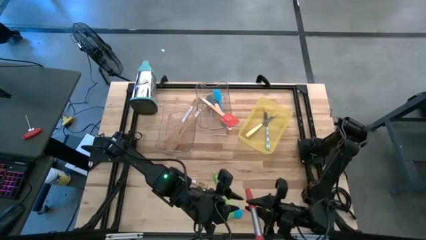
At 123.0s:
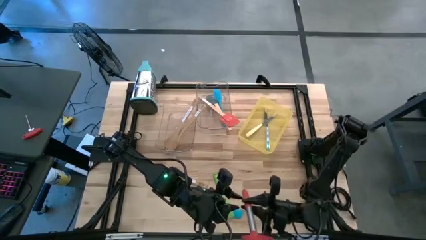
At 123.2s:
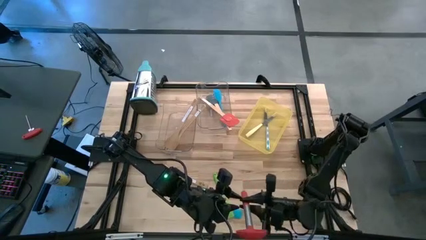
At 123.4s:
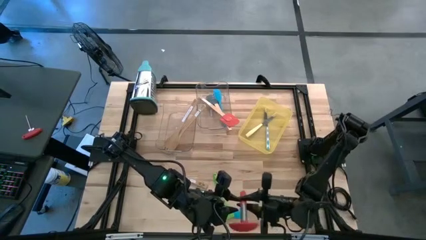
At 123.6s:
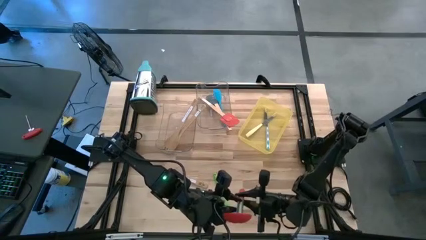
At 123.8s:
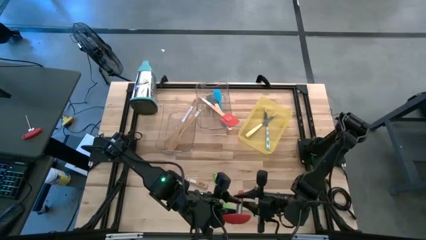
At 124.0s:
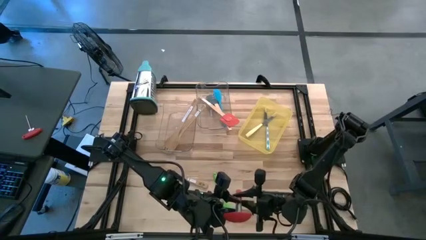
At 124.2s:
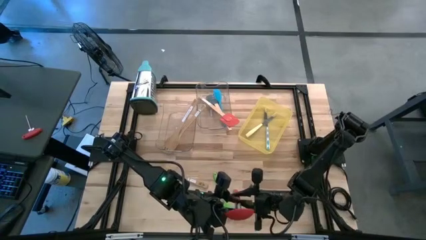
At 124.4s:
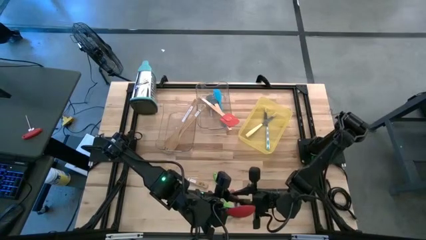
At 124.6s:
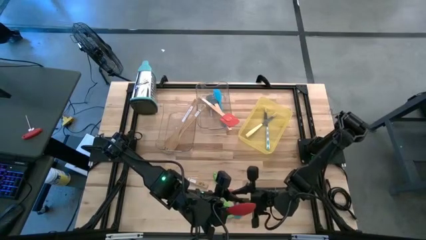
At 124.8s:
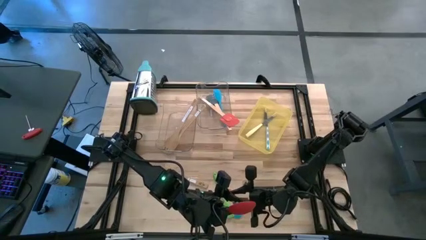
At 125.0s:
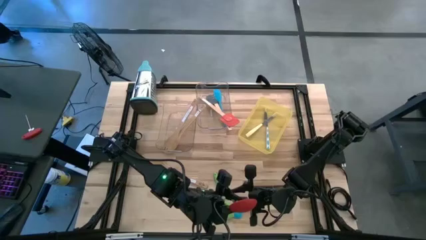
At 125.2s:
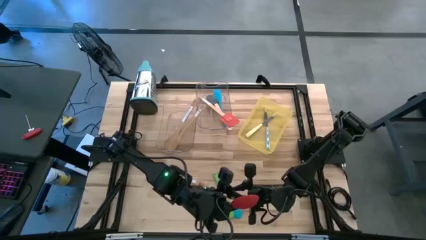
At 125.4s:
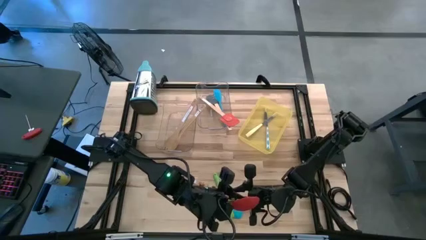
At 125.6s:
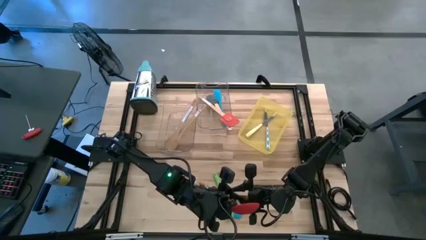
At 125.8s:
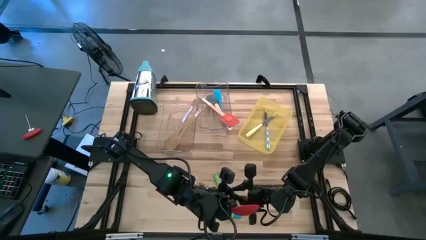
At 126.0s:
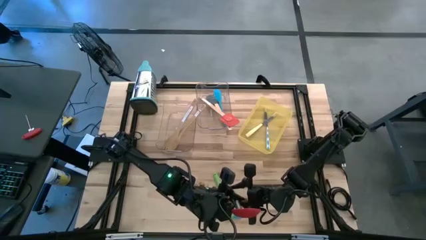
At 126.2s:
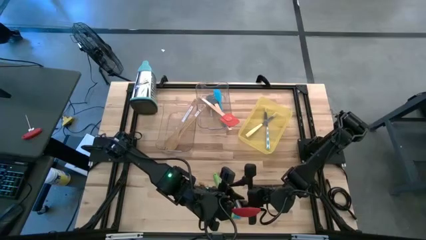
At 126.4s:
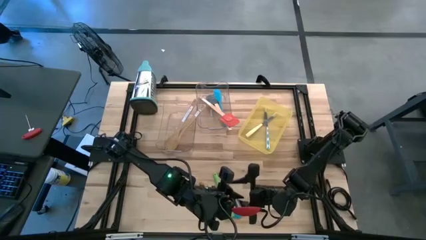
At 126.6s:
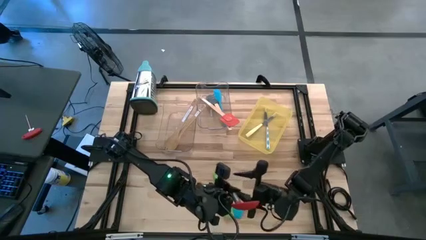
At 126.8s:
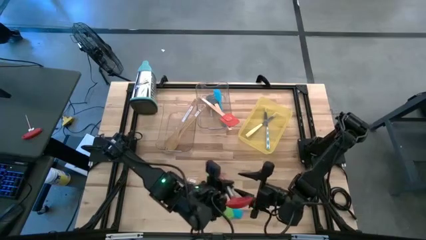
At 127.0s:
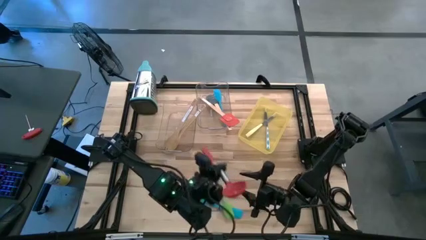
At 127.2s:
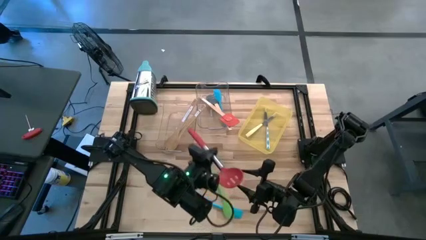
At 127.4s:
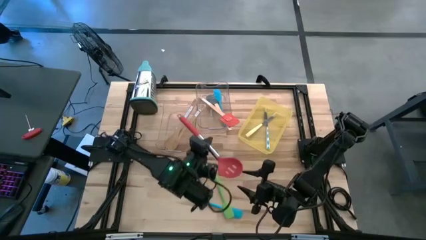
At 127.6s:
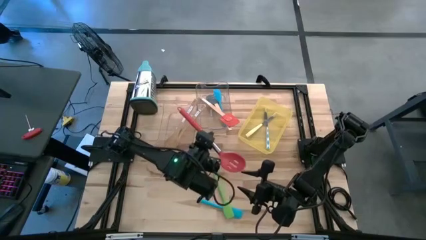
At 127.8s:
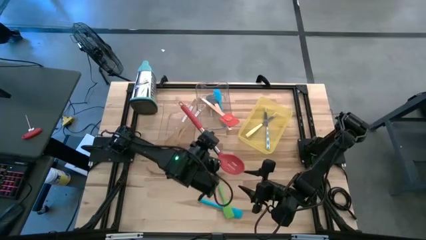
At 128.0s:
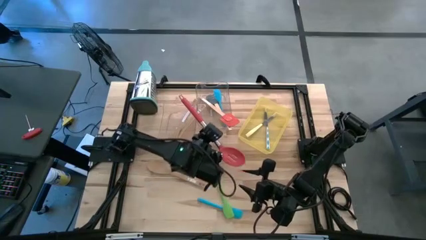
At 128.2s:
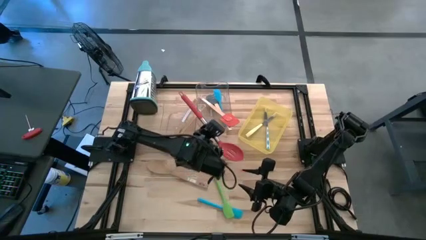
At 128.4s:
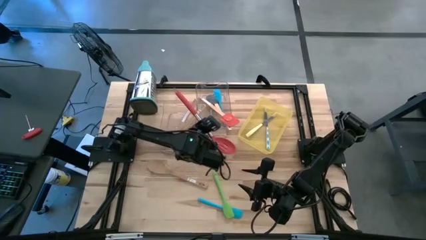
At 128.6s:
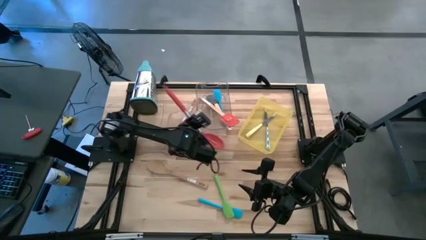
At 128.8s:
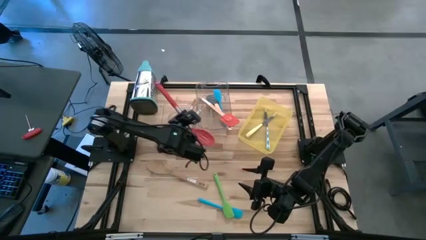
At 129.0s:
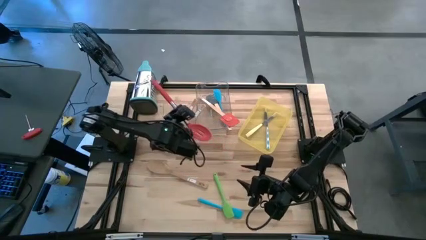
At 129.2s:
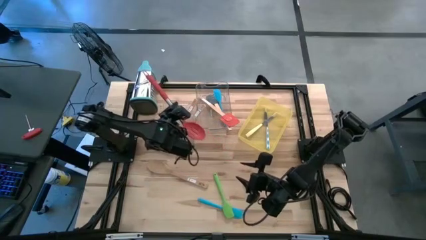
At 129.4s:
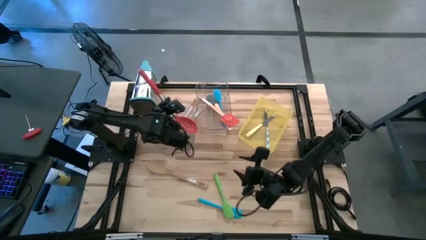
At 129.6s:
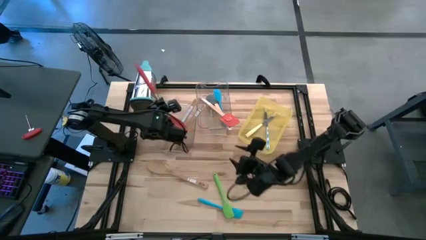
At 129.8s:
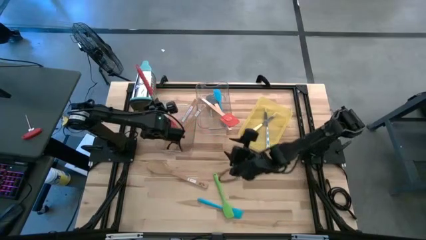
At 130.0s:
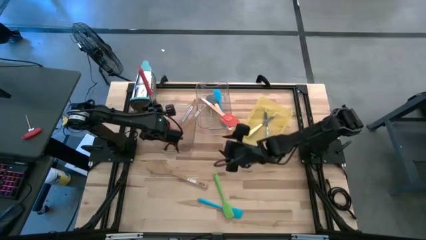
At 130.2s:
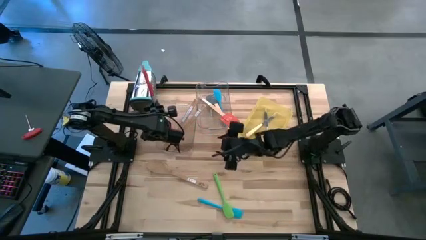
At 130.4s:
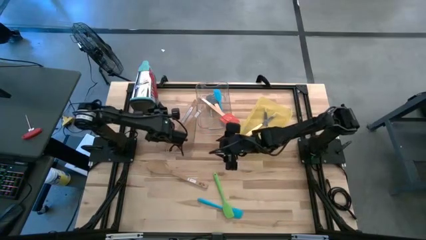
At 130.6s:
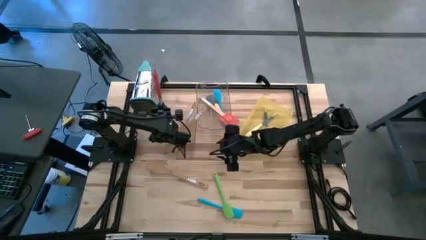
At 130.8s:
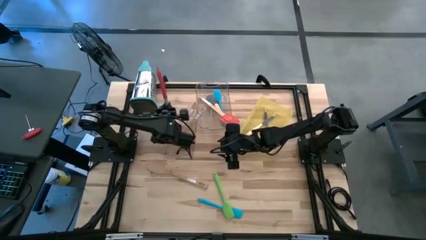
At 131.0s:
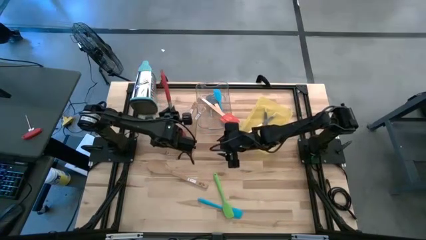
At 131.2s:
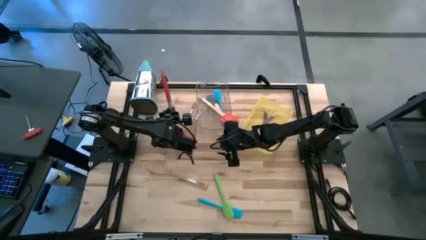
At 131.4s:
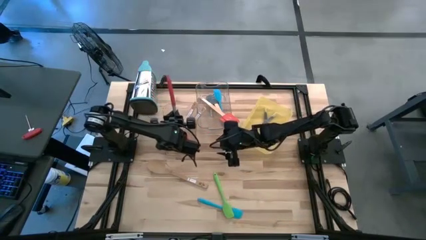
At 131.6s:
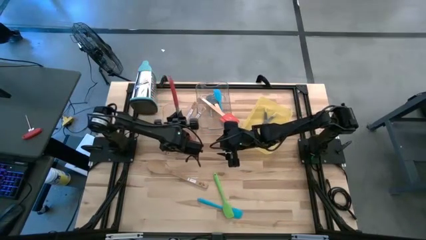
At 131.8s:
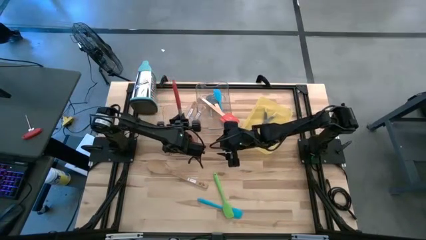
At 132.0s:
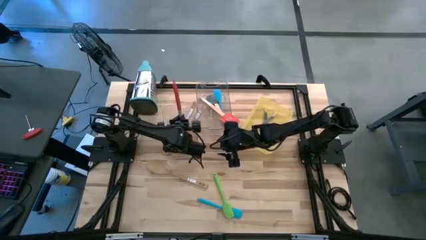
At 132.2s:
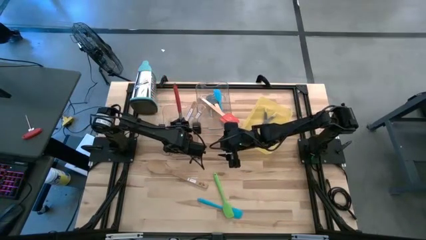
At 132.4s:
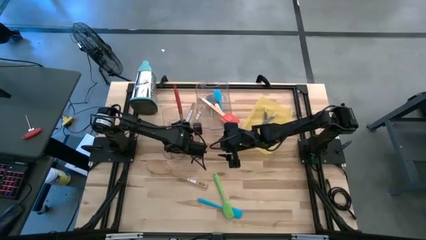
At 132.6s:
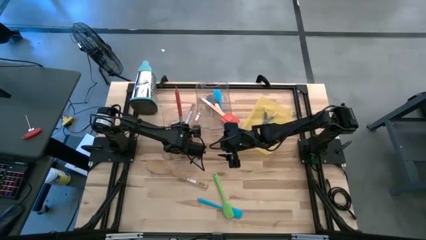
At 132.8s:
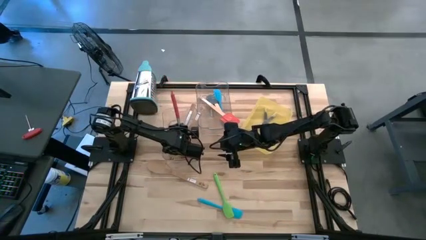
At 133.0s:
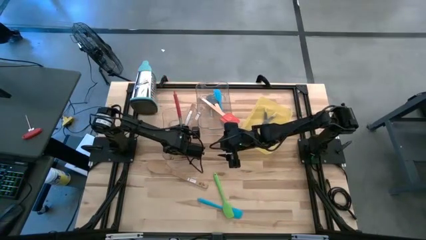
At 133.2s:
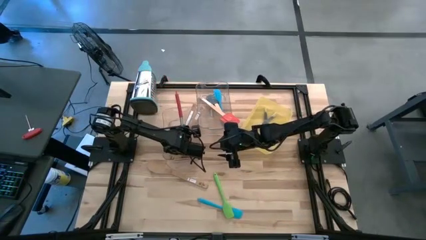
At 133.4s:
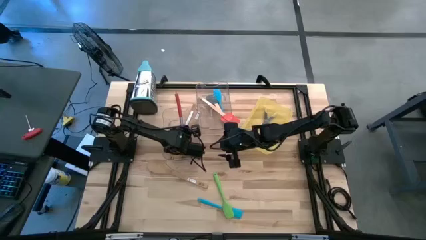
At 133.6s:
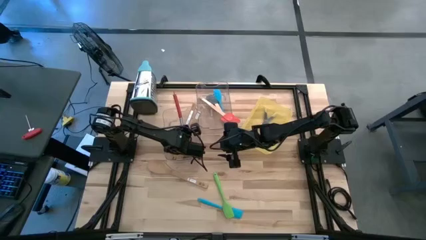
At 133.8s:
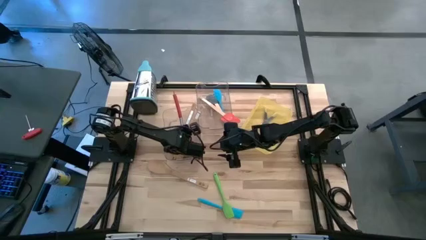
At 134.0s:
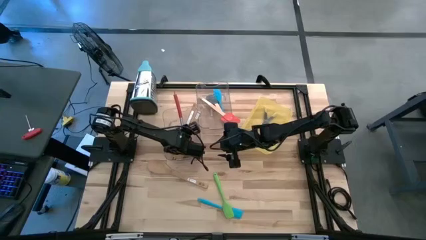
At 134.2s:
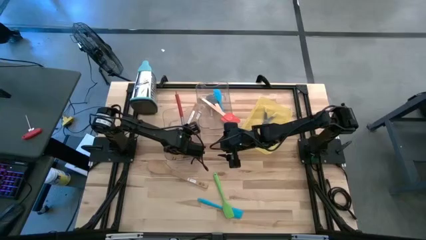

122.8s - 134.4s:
Task: Pick & Place Kitchen Items
Put the red serving spoon into the left transparent bin

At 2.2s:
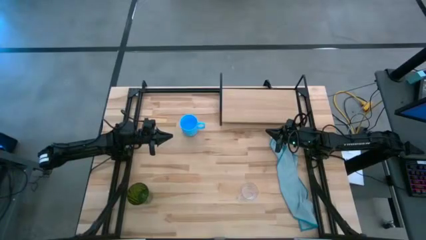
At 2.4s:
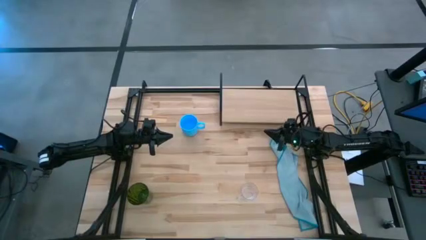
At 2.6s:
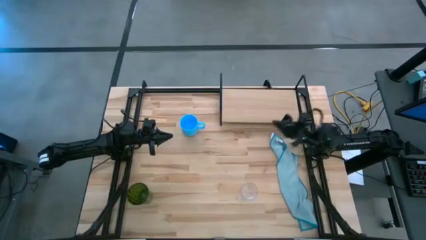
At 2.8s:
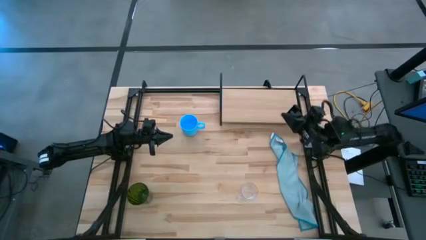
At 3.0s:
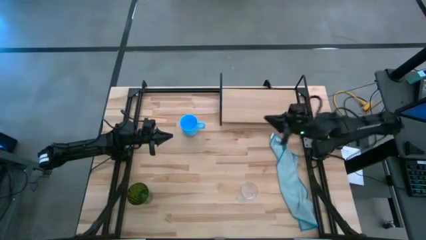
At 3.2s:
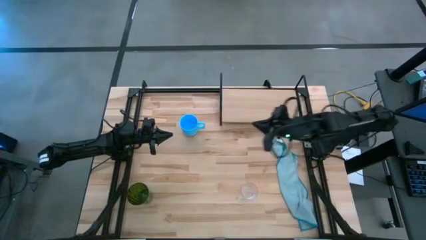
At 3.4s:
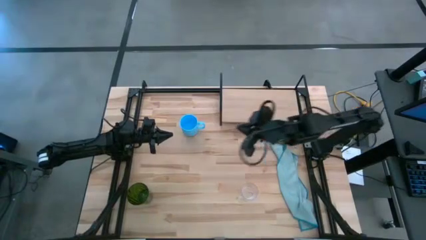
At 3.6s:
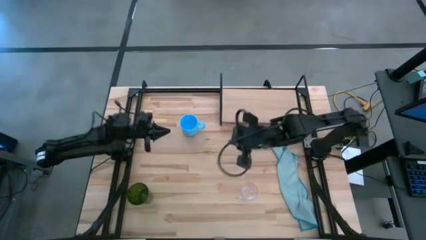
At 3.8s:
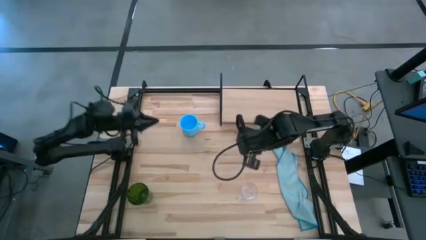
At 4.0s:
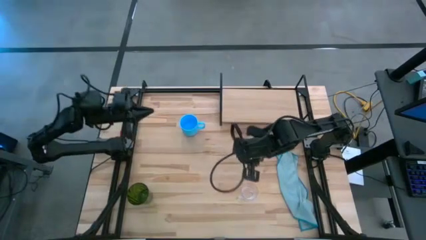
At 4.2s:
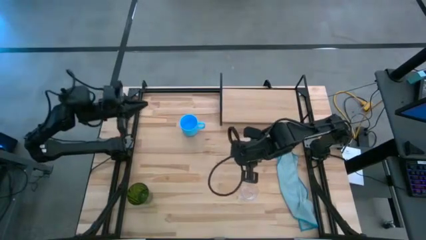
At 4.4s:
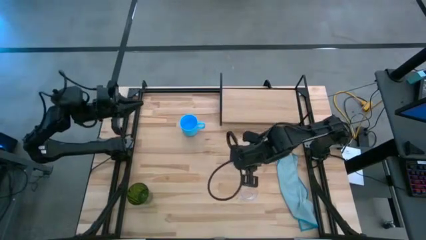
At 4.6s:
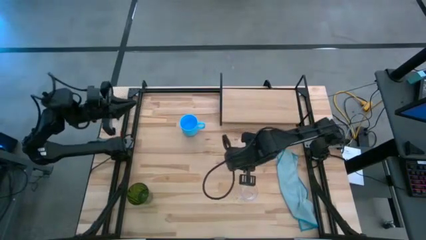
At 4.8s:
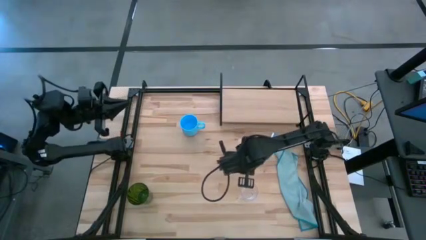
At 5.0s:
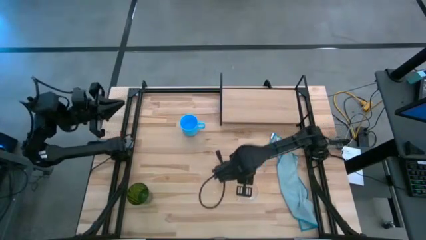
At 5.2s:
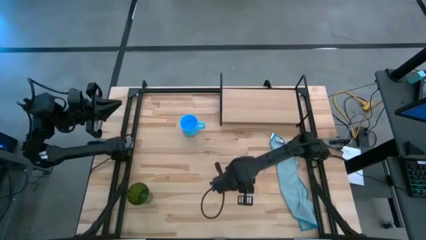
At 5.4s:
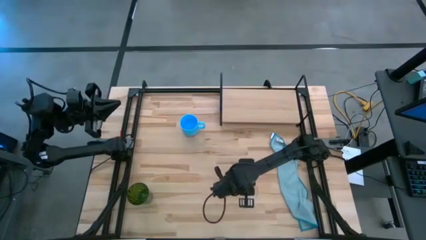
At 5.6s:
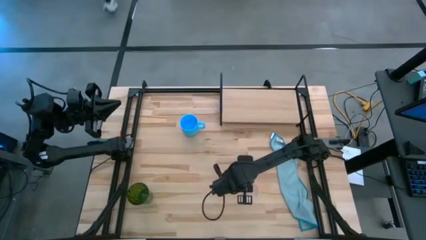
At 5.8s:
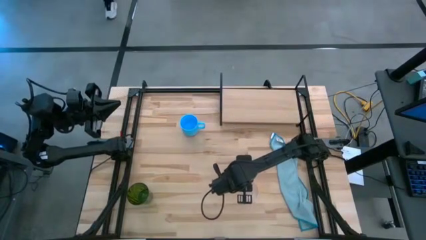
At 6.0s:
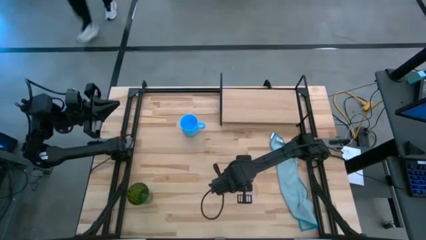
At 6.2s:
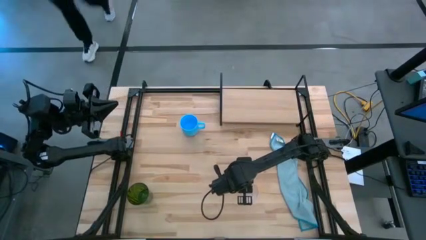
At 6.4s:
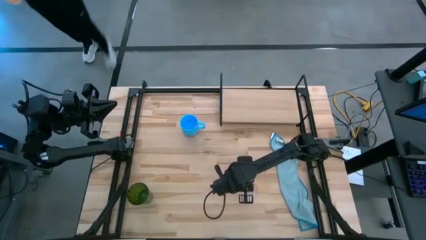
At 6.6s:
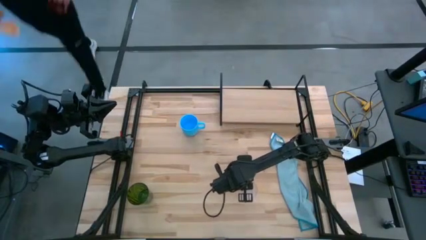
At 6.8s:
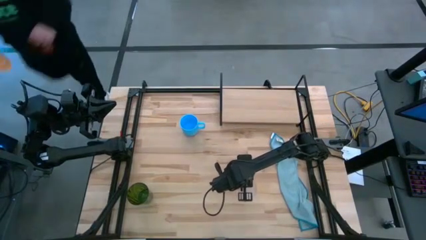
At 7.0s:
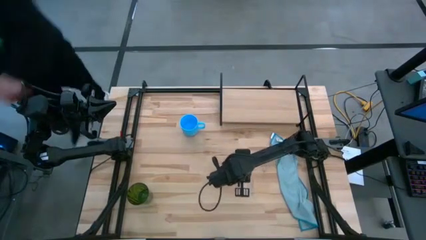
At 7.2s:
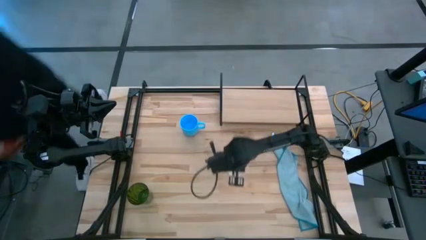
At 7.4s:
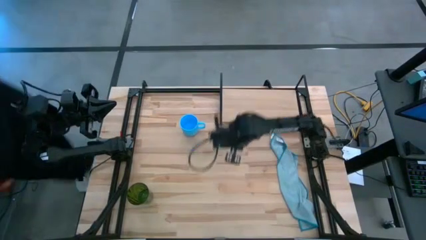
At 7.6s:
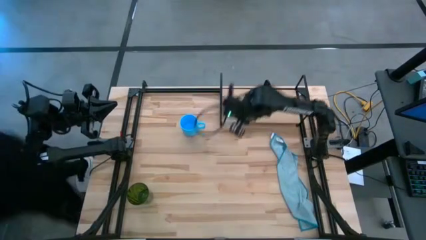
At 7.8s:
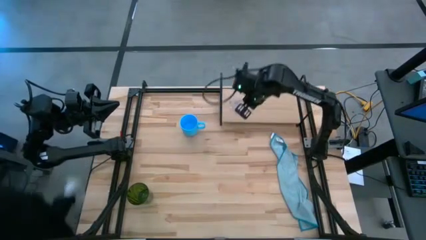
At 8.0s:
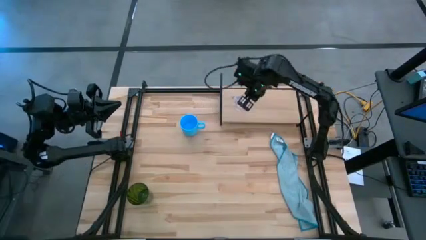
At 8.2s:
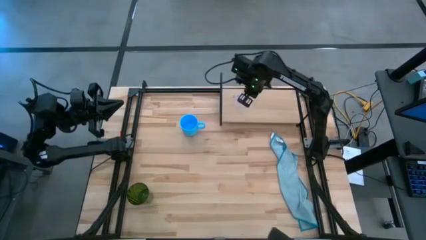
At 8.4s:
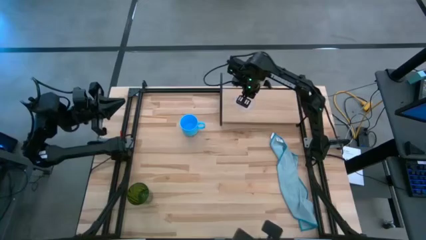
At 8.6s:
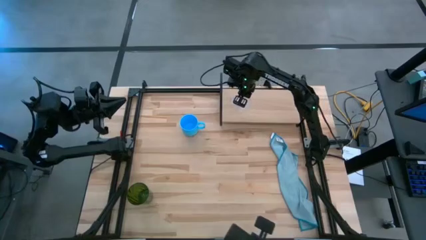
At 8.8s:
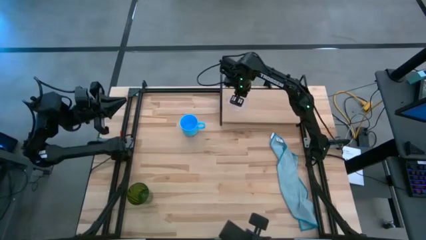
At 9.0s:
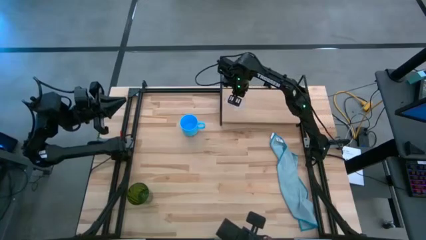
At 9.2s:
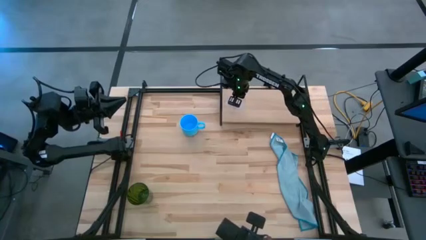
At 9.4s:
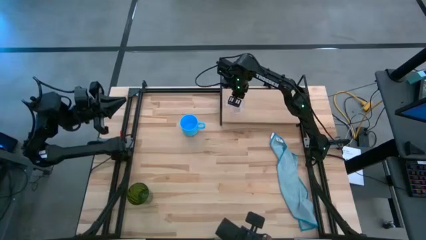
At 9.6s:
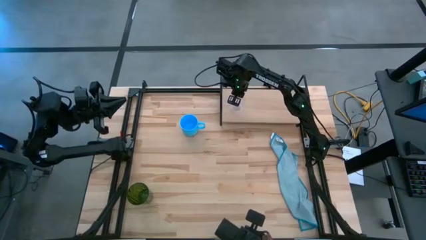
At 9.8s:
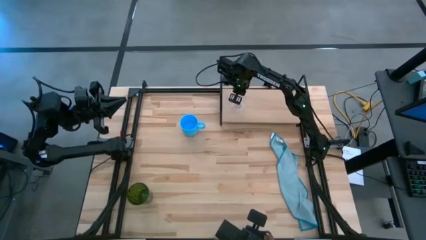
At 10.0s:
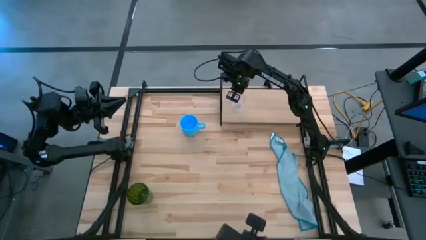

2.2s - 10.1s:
Task: Stack small to large cups/mugs on shelf
Put the transparent mug on the shelf
